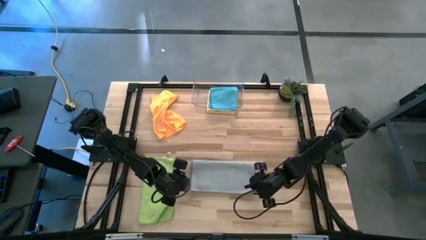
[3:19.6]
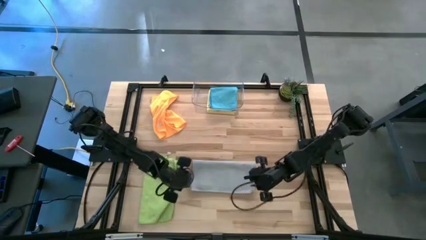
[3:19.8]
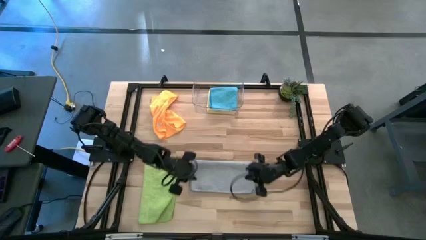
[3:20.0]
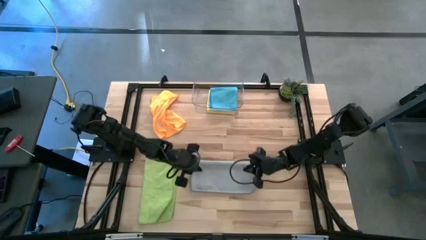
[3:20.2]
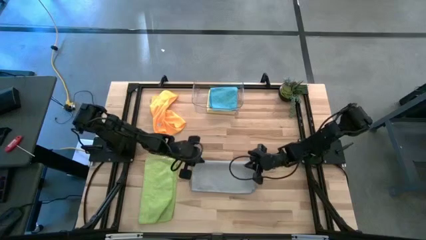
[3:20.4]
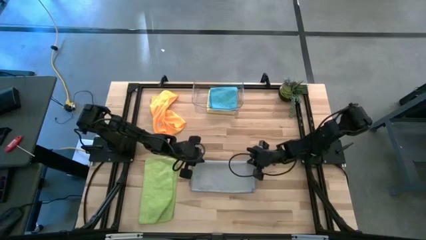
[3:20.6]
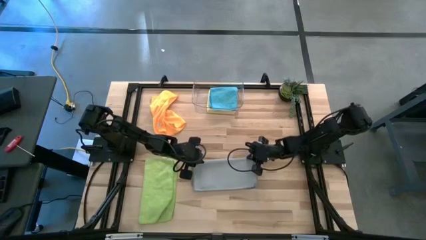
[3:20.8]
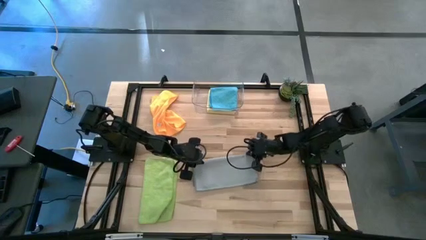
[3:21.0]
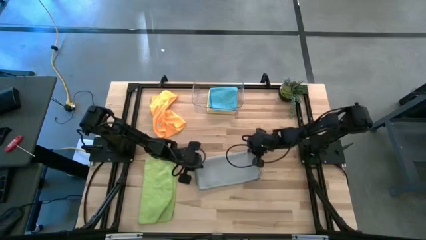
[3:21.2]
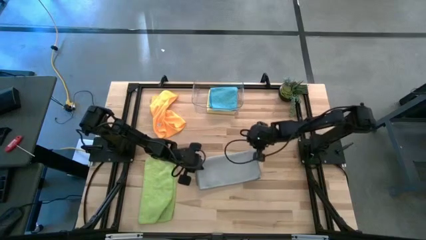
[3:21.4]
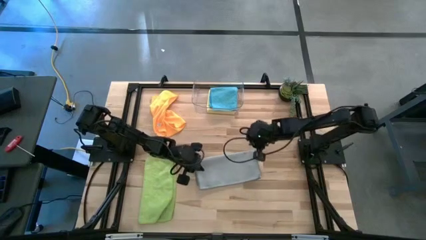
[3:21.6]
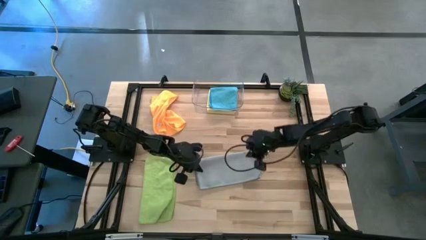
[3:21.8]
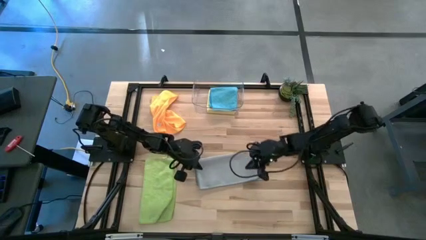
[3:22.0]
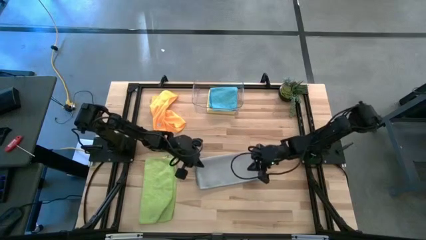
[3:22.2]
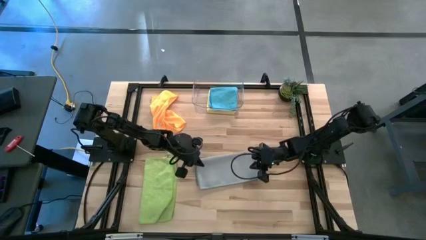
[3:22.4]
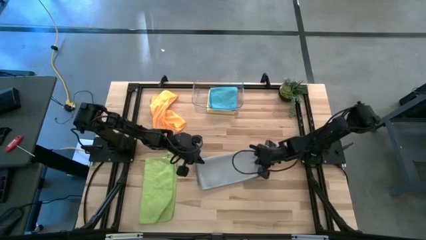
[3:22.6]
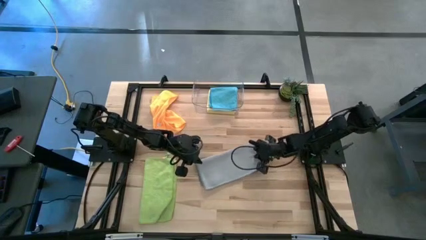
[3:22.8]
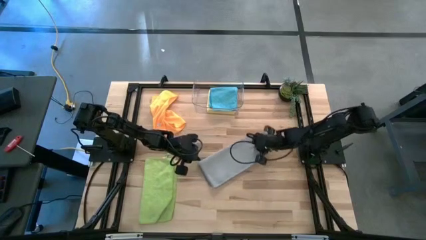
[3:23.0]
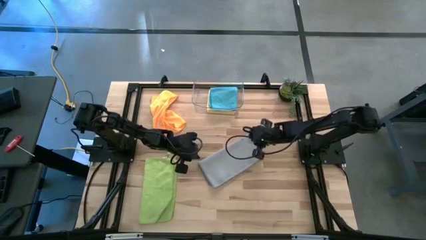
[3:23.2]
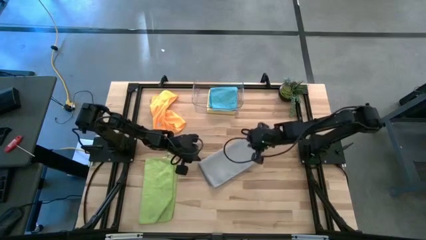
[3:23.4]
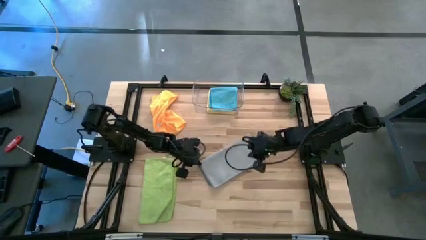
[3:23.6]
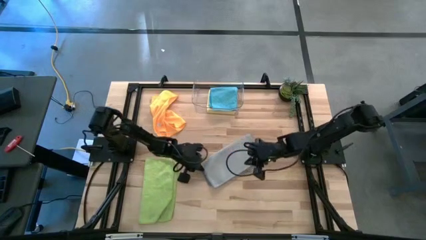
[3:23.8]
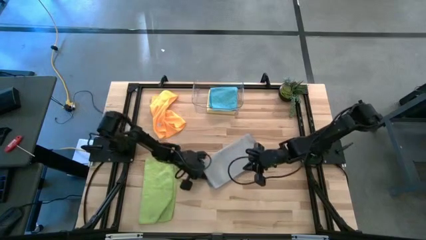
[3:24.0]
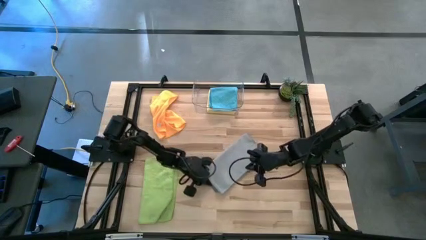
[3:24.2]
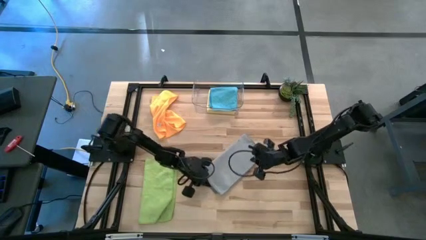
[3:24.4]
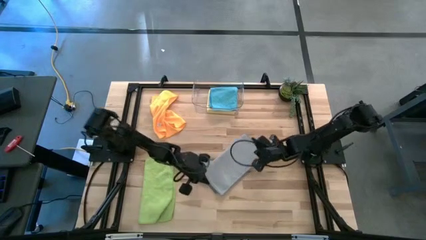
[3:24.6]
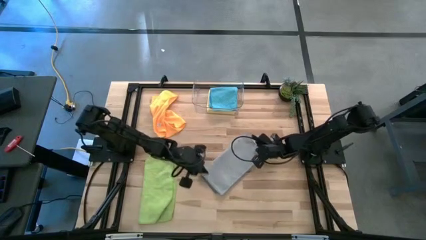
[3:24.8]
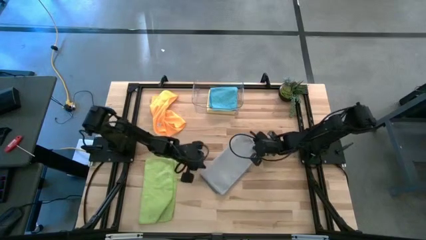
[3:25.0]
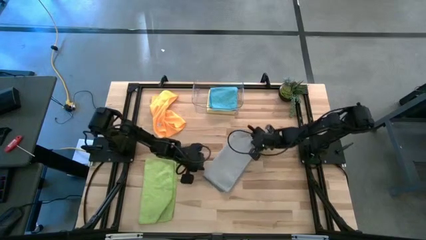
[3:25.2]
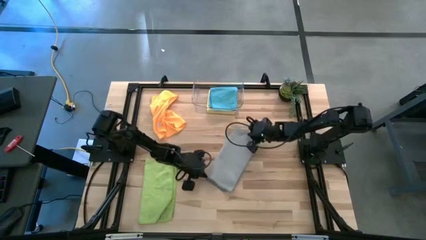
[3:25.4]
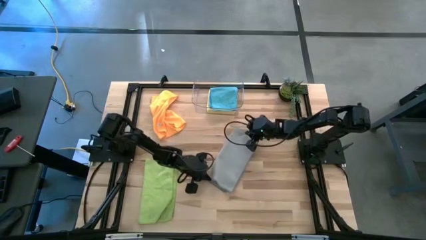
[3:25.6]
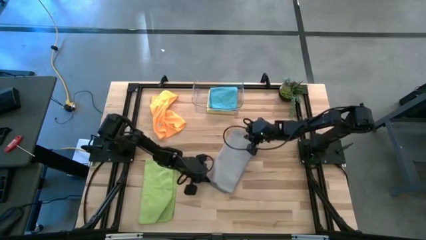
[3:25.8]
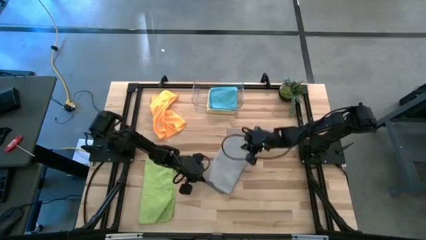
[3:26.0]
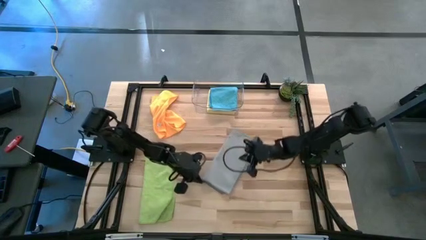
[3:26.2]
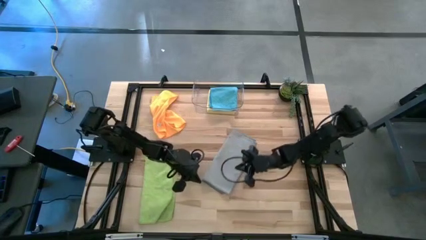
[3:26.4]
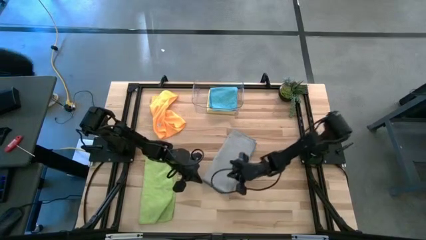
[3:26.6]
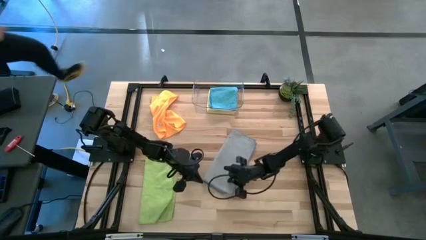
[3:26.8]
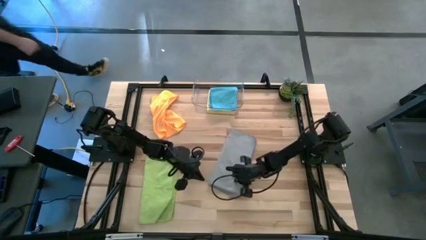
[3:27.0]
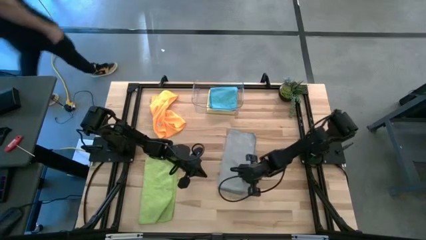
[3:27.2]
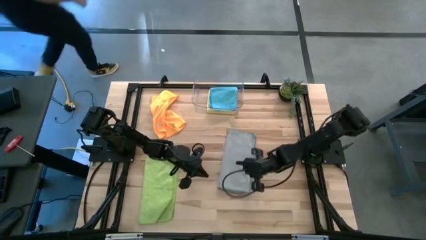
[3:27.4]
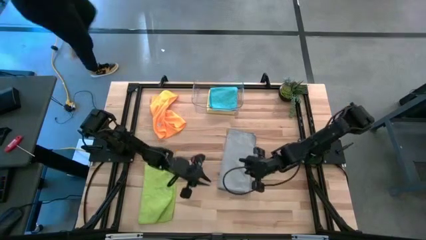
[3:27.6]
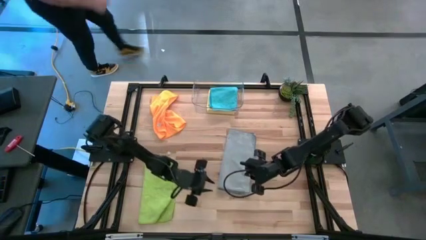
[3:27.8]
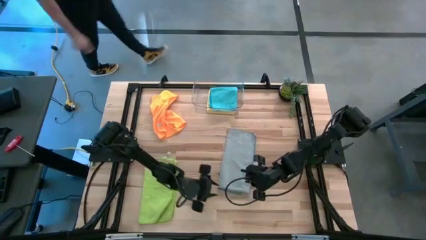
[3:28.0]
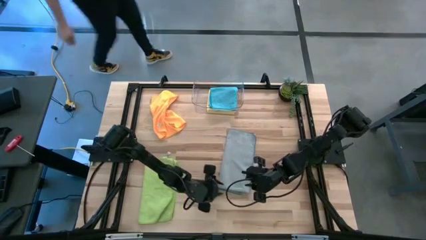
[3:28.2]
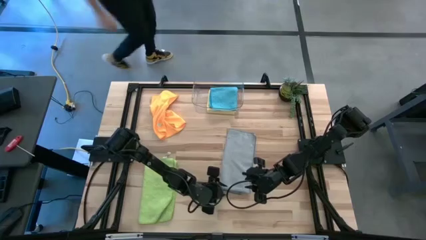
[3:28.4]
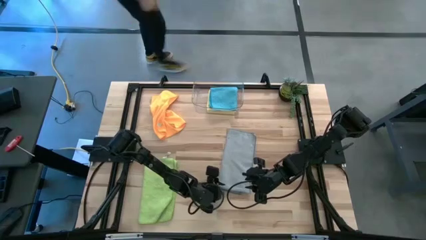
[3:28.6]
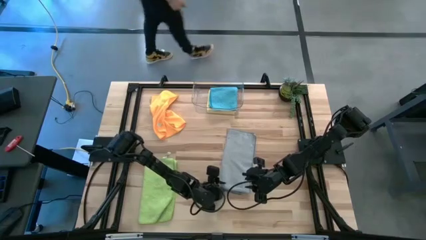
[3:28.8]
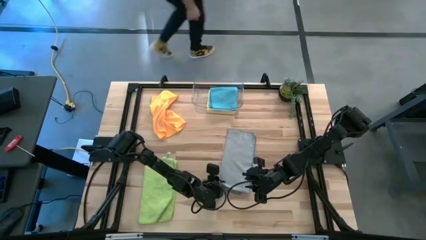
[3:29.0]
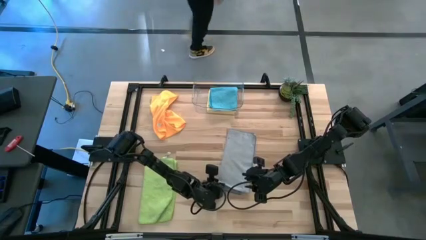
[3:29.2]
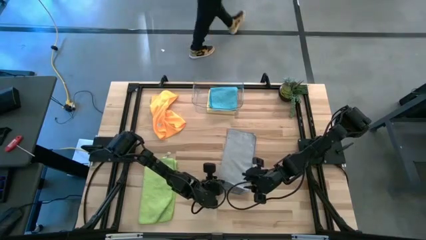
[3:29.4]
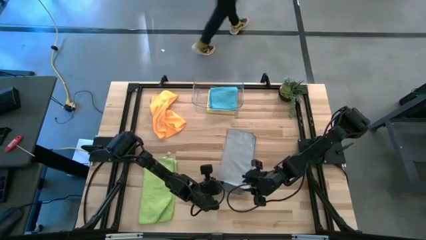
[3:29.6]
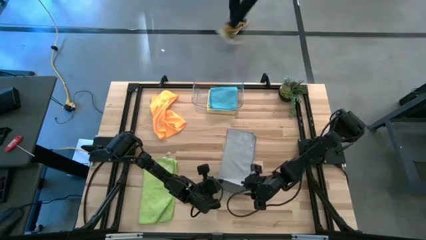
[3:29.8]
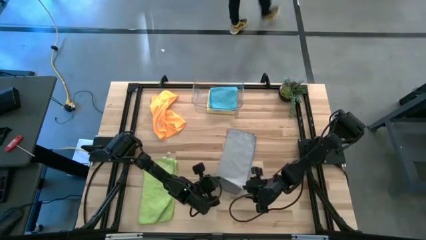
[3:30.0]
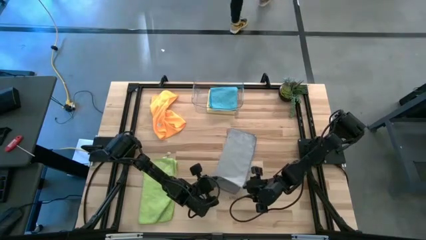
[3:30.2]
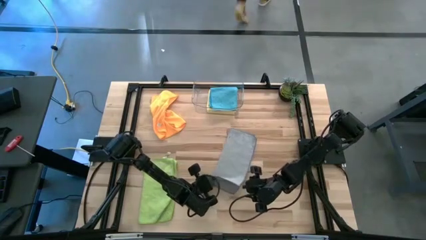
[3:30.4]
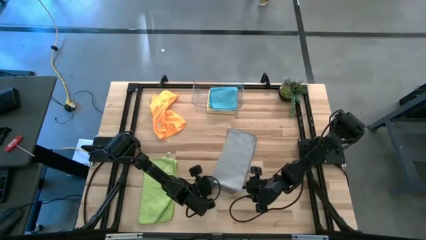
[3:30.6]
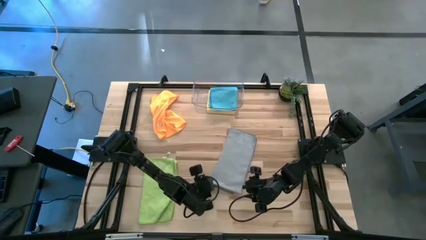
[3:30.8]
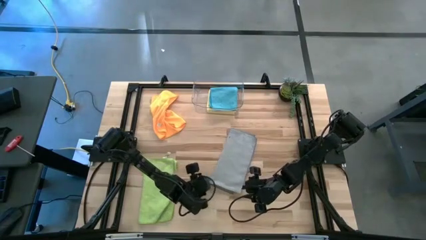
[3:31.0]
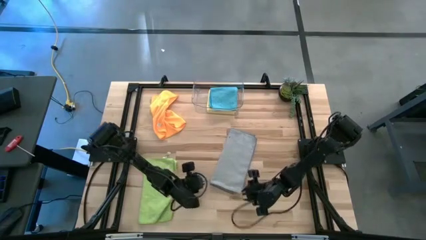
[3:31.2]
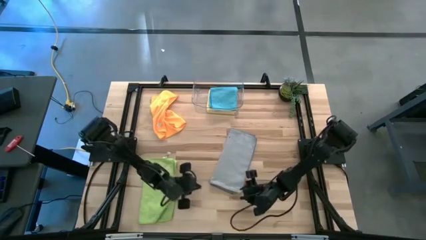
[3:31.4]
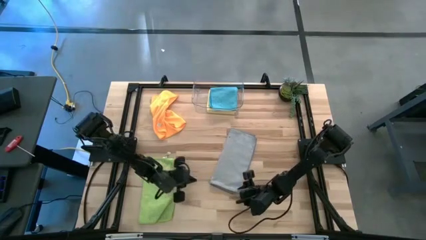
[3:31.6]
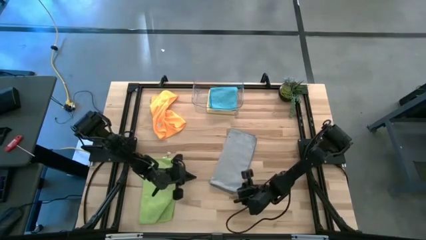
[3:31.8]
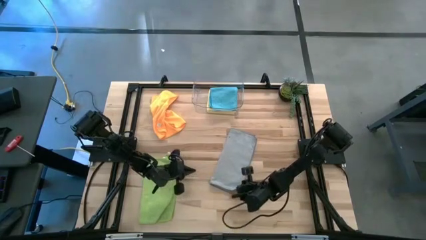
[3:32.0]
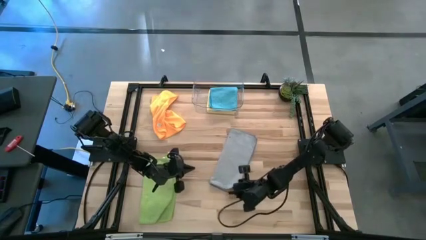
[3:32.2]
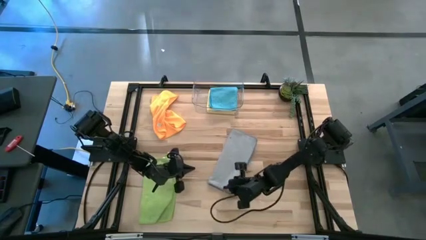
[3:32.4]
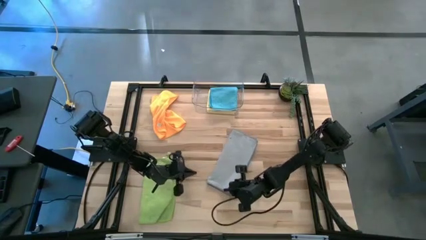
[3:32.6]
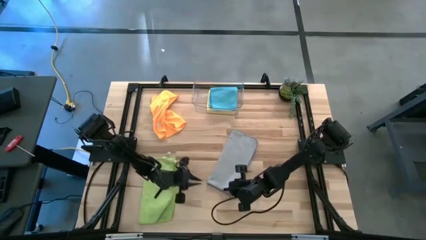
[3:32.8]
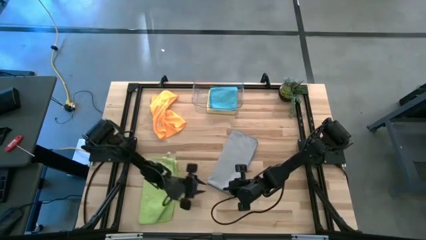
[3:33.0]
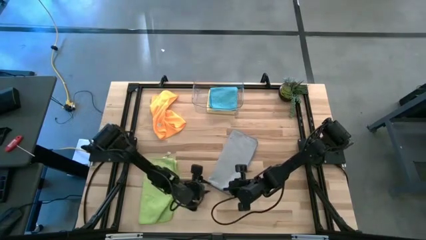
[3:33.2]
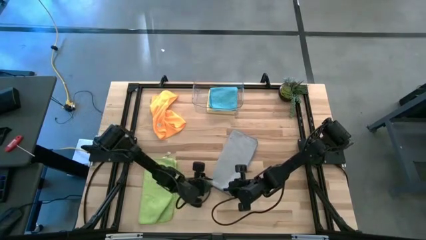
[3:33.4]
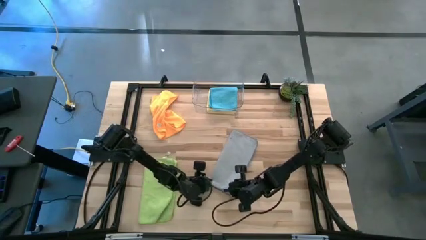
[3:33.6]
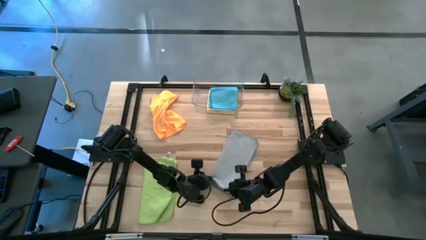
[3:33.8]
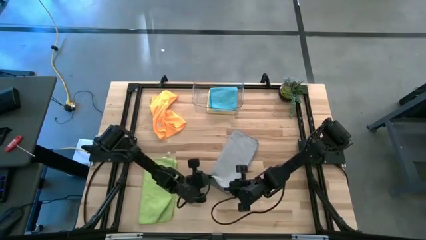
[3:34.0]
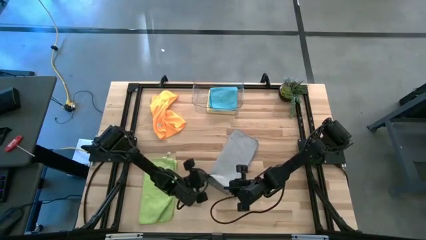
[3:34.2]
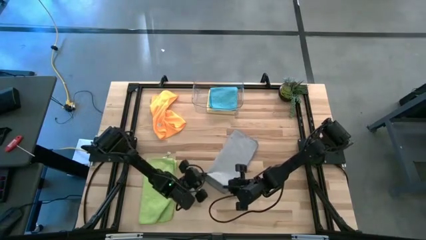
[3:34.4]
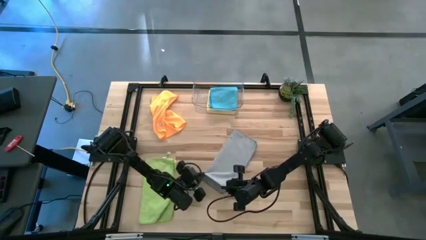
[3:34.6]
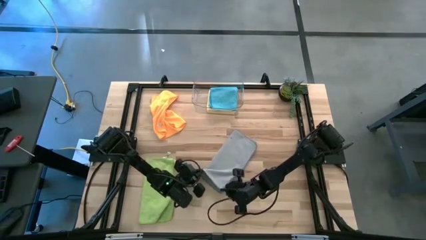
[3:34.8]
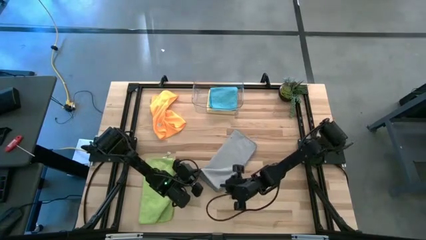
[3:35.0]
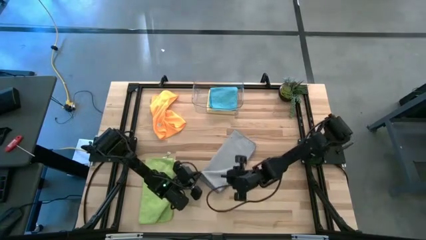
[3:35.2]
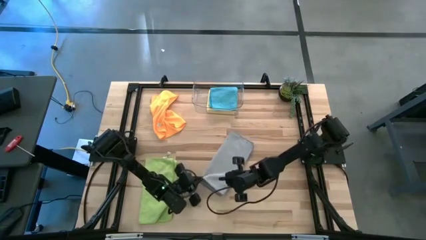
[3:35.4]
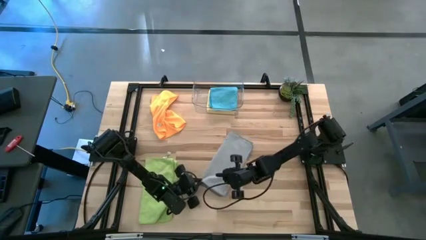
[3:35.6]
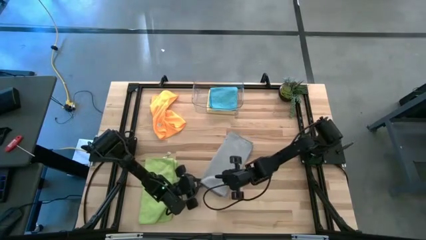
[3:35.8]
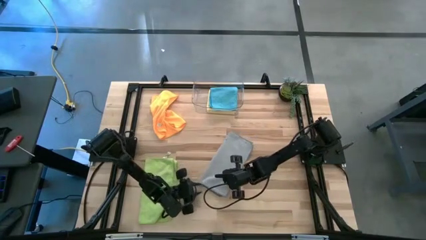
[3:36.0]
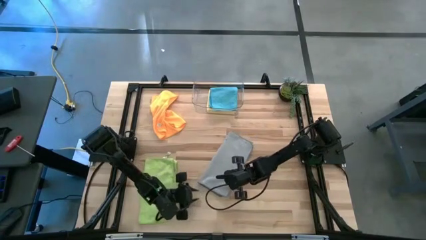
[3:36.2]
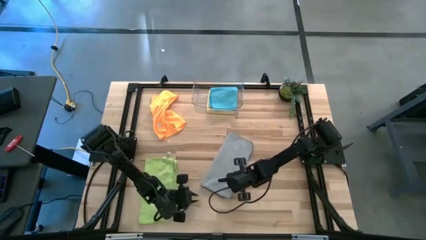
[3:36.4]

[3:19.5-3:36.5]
Task: Fold microfiber towels
Fold the gray towel on the table
